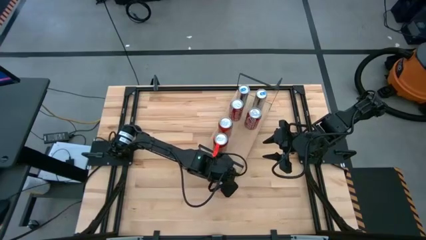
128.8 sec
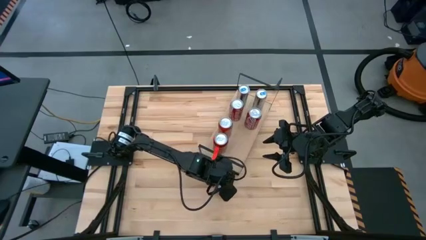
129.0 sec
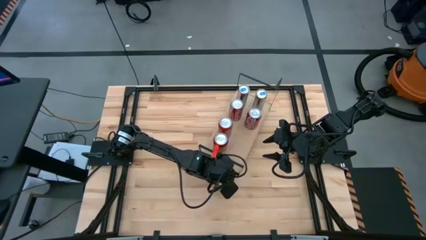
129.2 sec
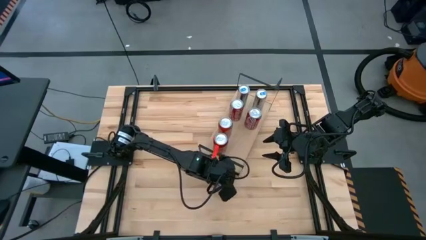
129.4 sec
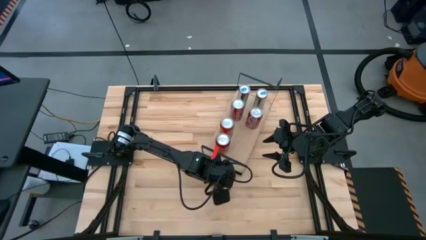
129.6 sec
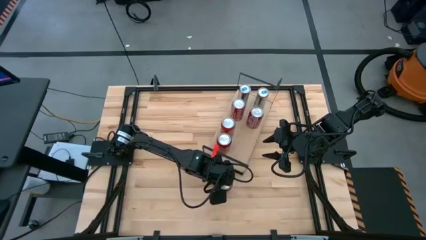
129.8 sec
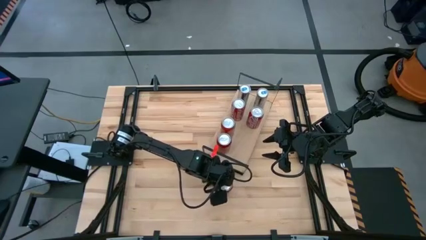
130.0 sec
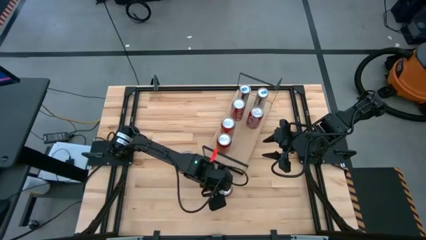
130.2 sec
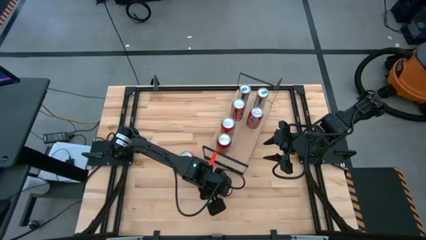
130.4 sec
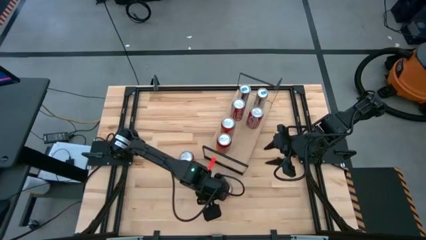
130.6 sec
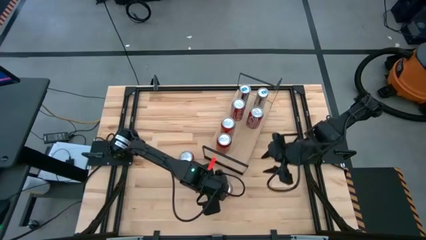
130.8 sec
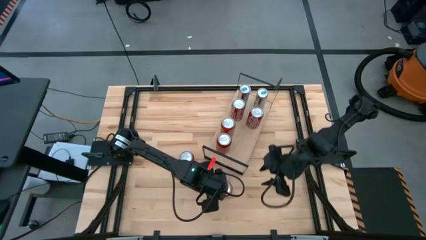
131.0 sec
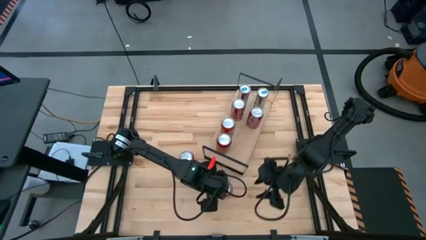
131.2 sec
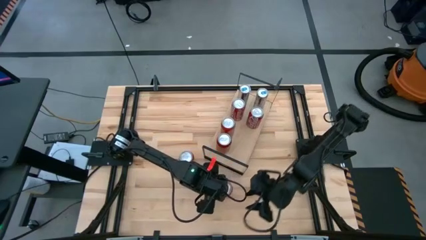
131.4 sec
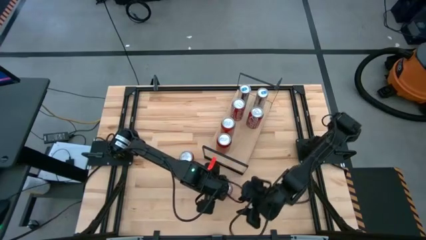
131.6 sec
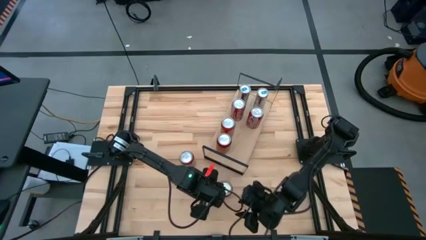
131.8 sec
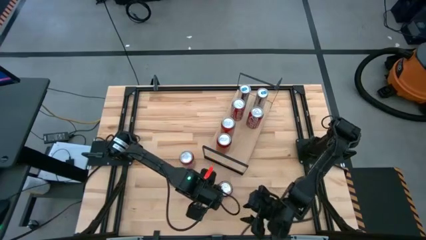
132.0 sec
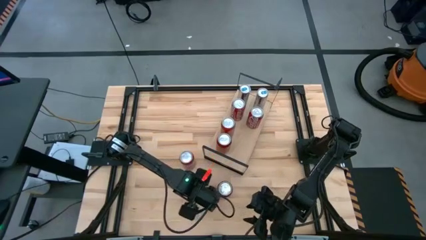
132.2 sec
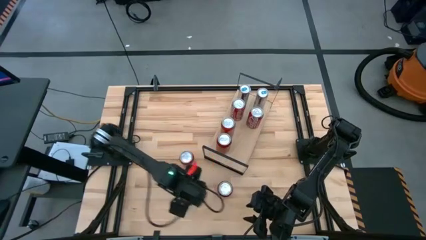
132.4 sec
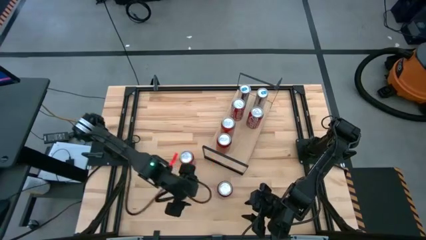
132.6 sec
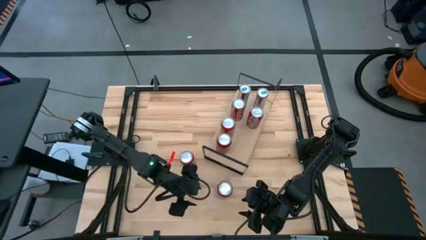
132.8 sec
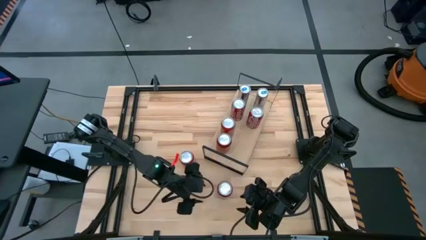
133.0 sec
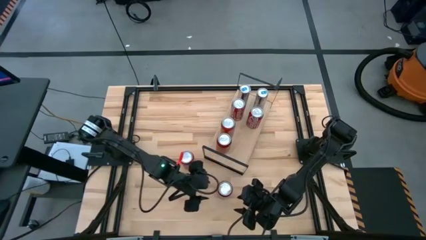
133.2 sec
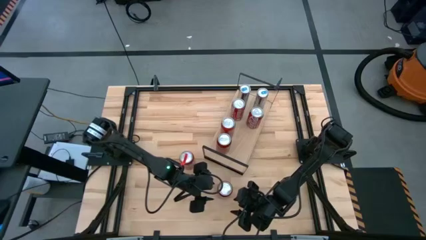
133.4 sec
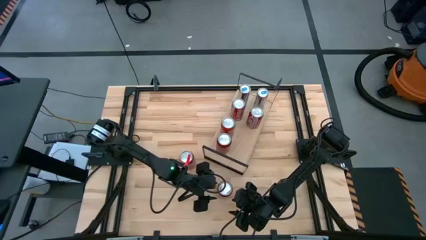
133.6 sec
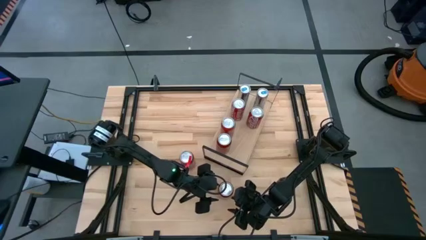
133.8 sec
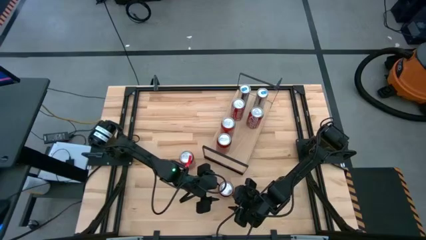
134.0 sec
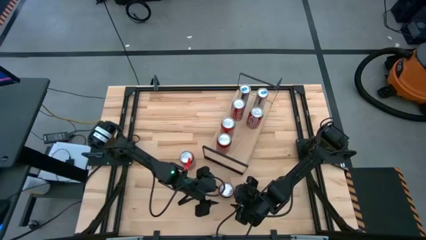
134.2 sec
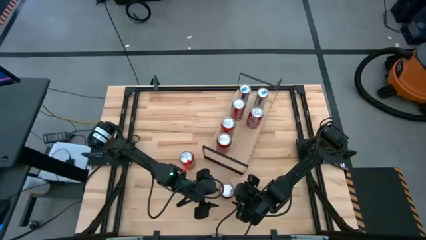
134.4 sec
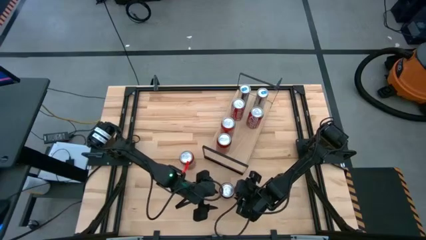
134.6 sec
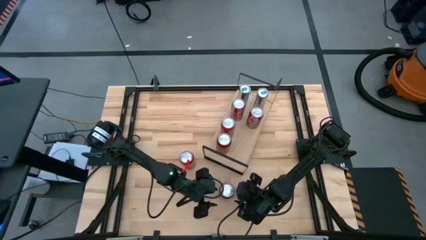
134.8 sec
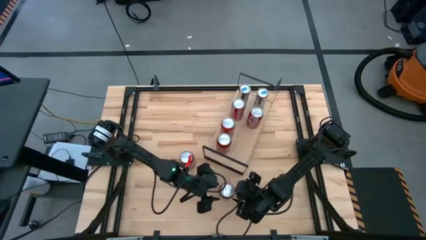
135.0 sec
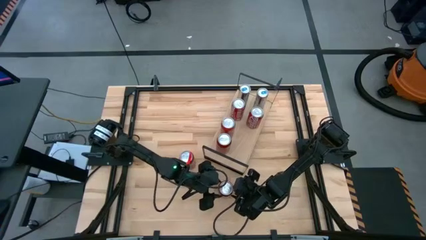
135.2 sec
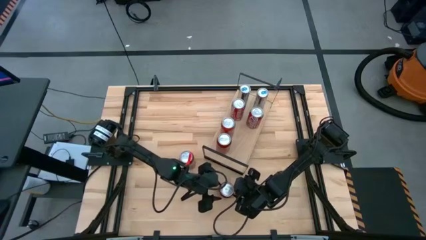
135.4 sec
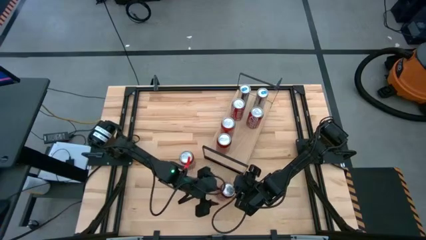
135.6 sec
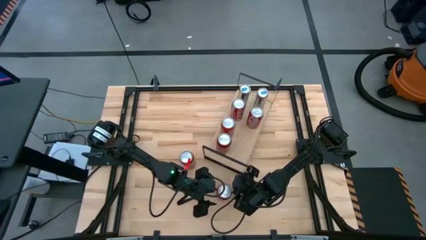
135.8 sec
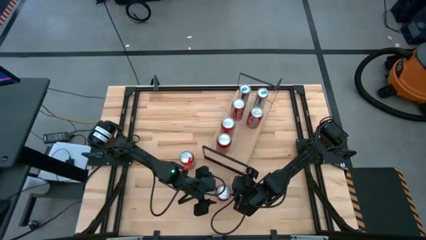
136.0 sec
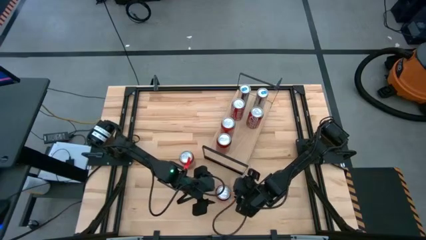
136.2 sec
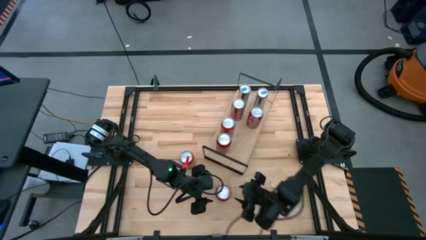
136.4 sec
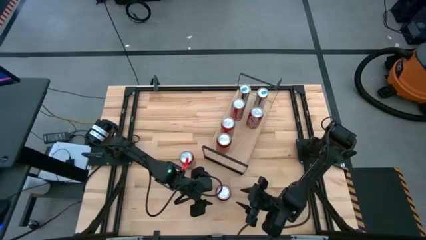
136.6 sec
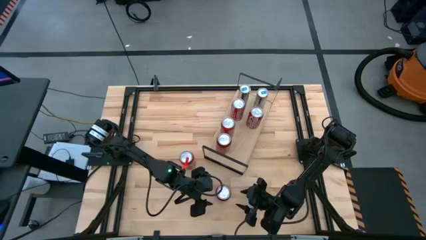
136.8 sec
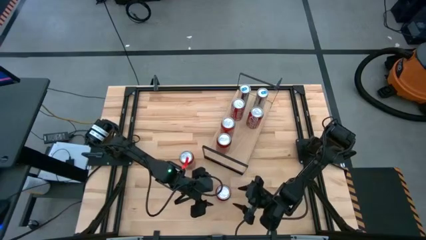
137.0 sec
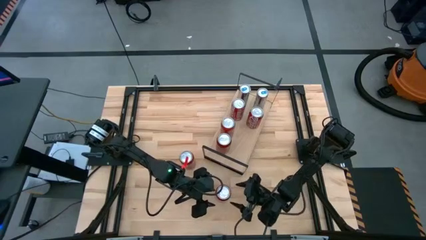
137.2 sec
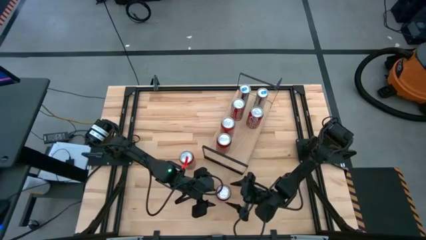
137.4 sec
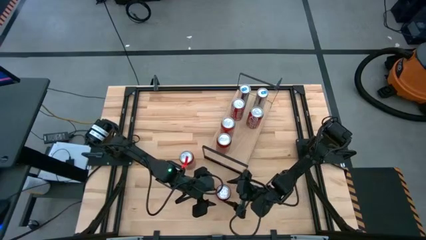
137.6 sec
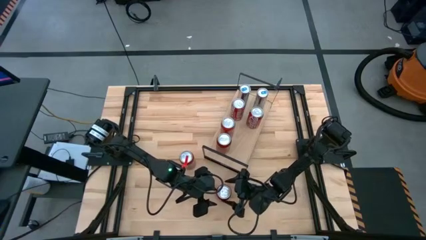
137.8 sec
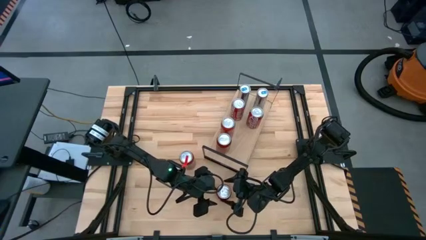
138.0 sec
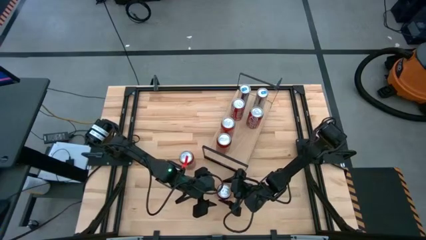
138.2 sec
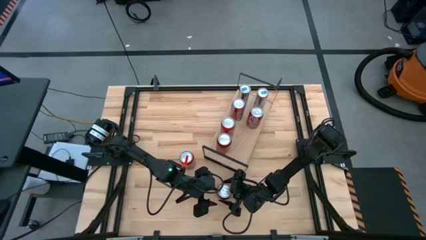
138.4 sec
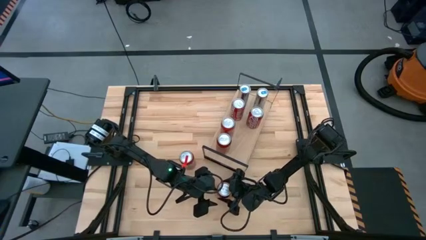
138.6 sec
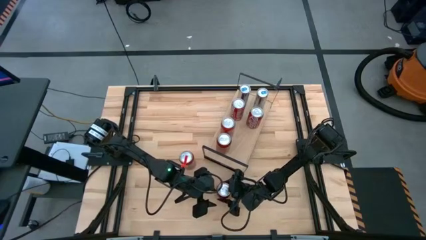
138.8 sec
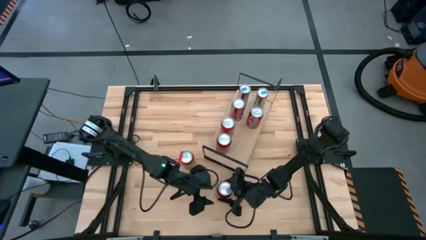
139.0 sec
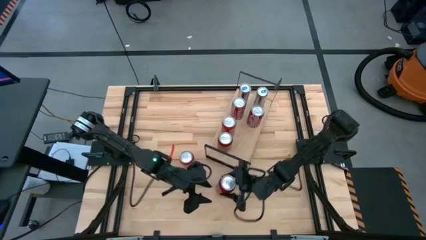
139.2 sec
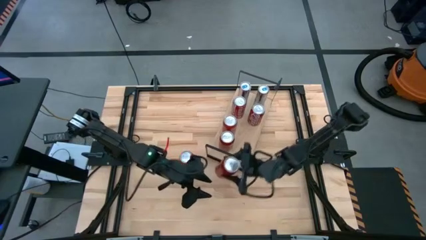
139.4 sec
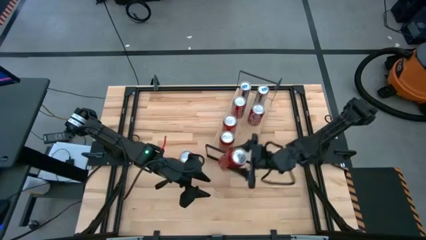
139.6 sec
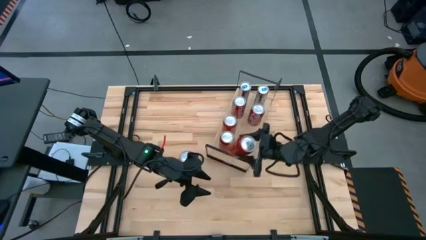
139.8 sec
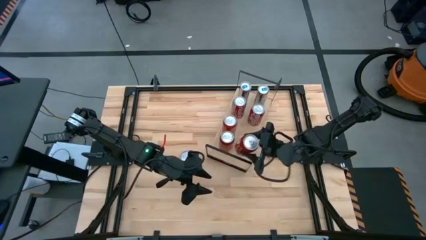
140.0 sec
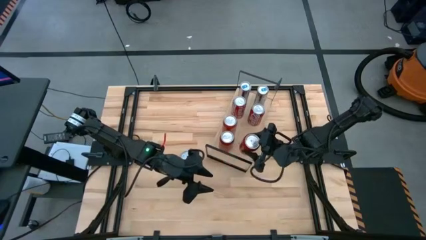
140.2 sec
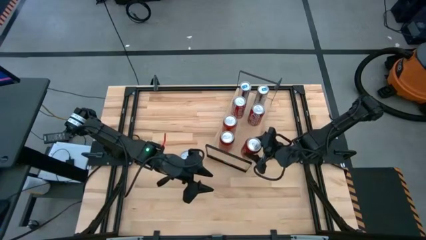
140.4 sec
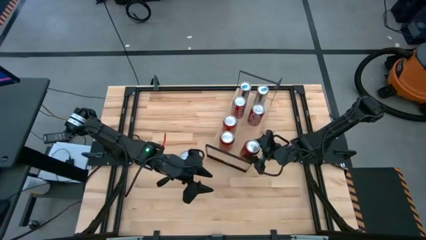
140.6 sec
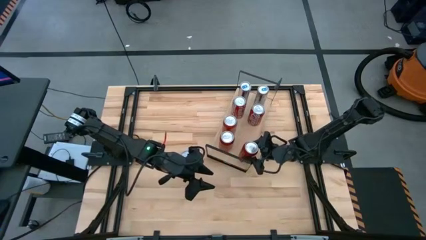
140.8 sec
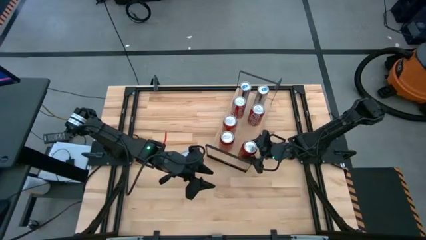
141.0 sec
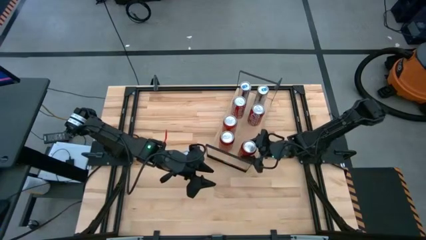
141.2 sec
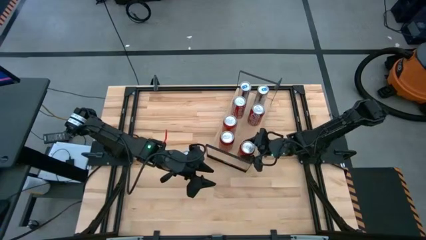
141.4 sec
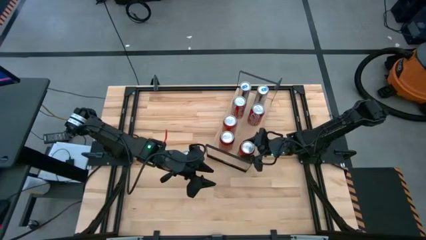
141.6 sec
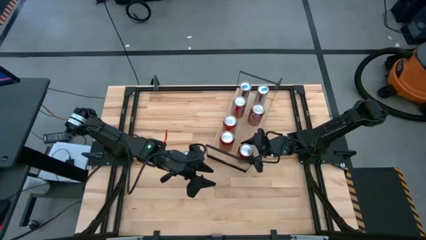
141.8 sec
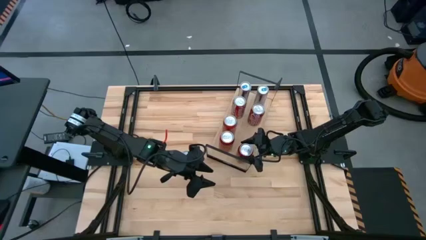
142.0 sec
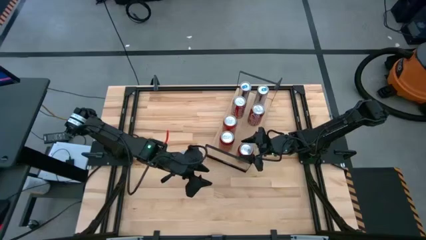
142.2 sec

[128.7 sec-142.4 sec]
Task: Place canned beverage on shelf
Put the red-black soda can on the shelf aligned with the other red-black soda can

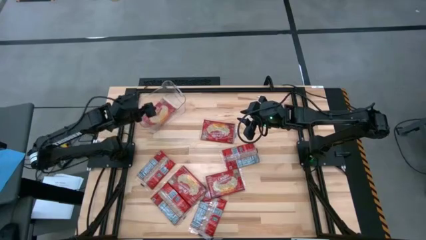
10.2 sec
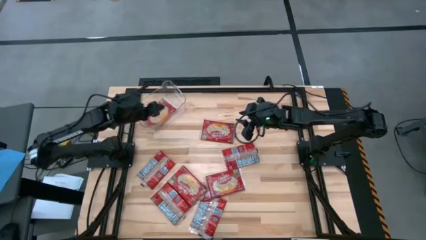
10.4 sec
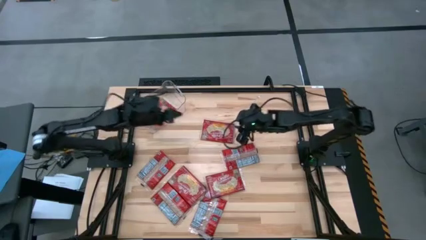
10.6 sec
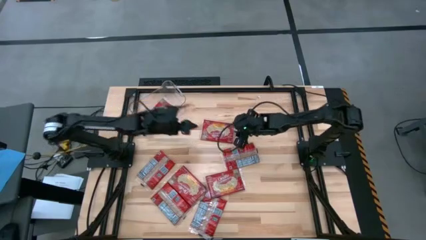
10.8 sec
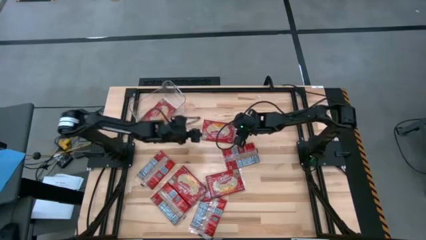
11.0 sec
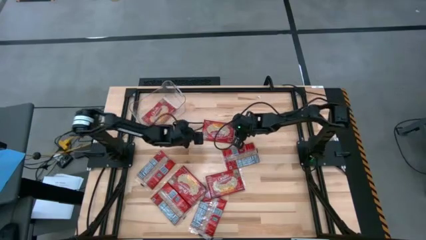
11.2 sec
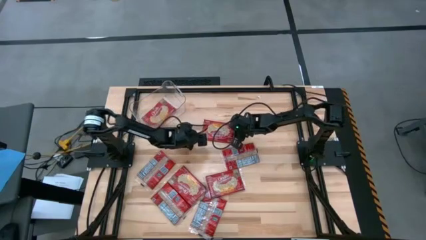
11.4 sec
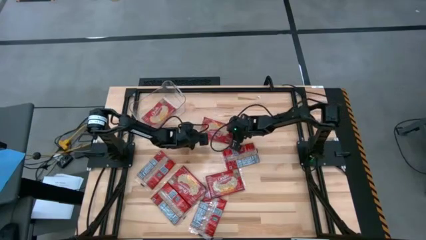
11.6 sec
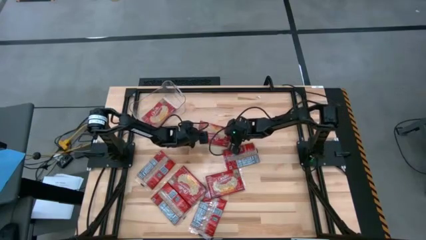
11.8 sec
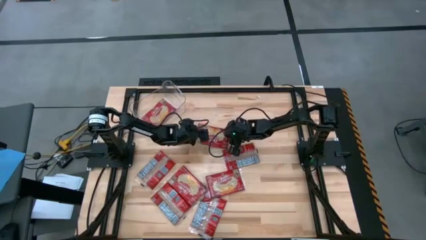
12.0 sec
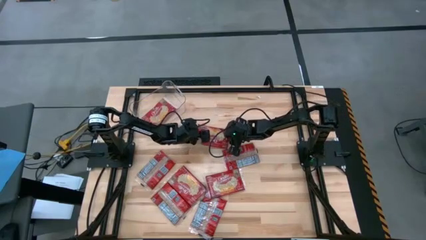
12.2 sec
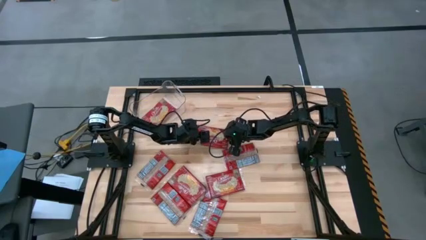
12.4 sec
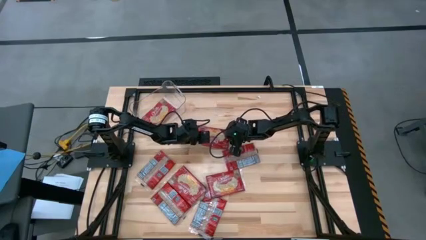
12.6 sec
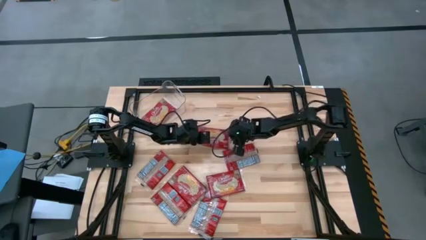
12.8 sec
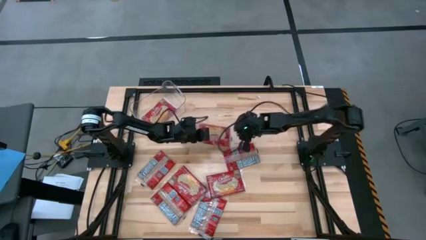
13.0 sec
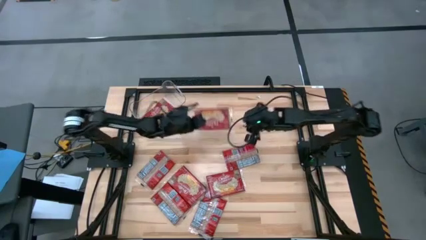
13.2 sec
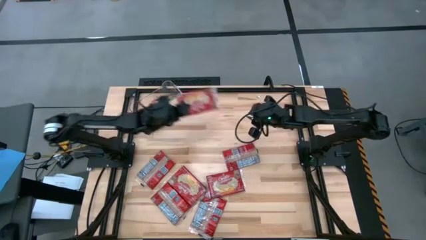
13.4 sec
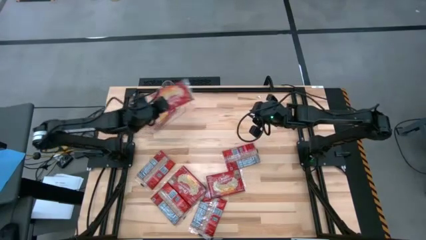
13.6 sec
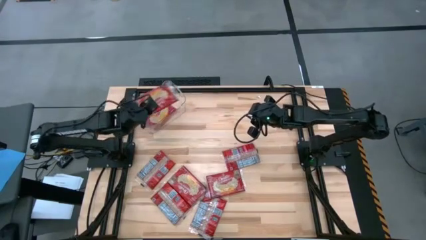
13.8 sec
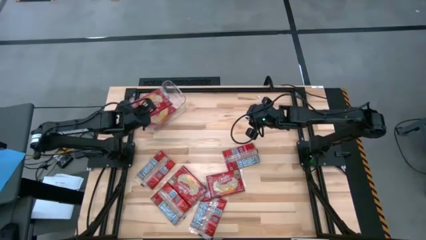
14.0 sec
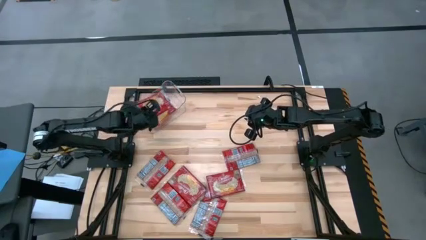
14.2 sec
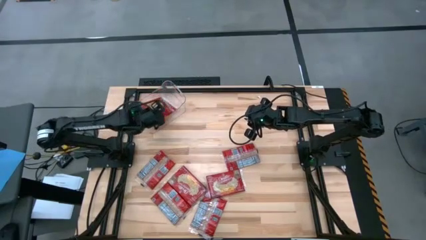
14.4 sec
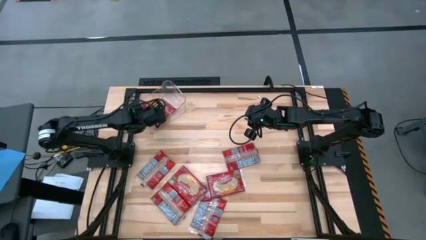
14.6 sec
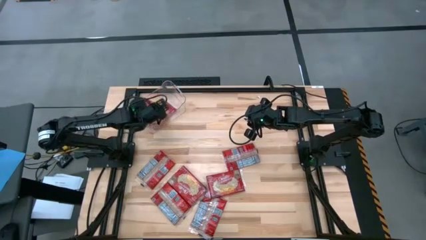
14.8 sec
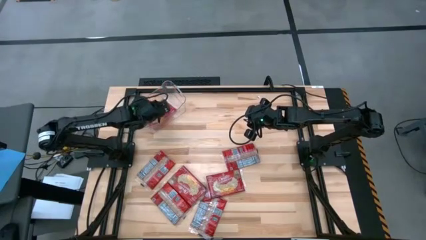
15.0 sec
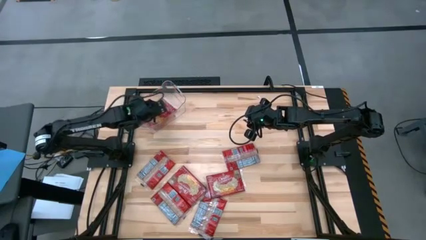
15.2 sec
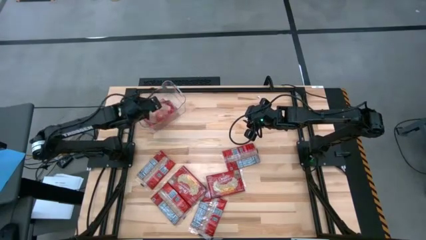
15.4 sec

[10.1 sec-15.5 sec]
Task: Sort popcorn bags into baskets
Put the red popcorn bag into the transparent bin
